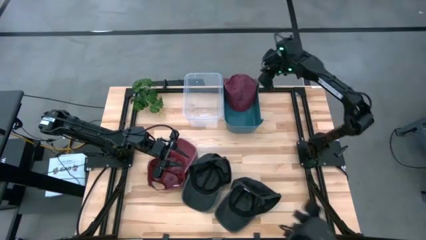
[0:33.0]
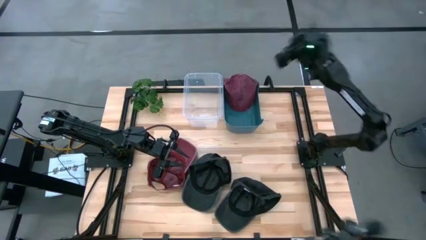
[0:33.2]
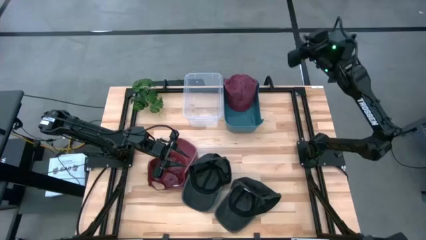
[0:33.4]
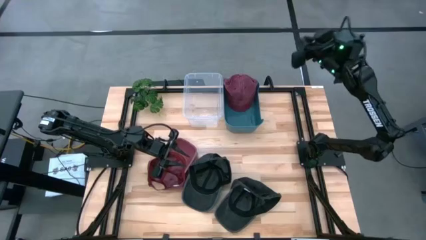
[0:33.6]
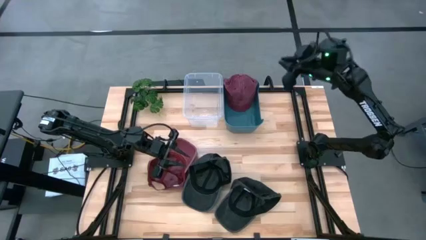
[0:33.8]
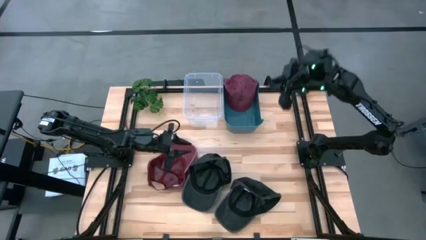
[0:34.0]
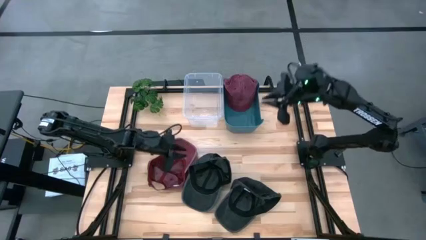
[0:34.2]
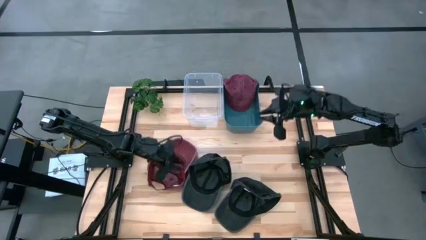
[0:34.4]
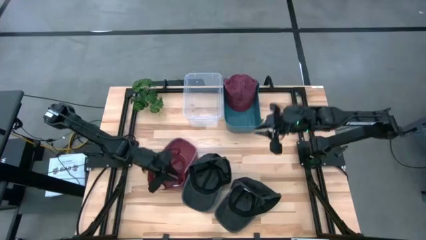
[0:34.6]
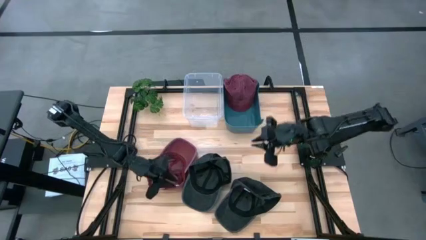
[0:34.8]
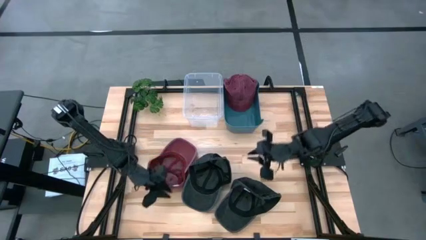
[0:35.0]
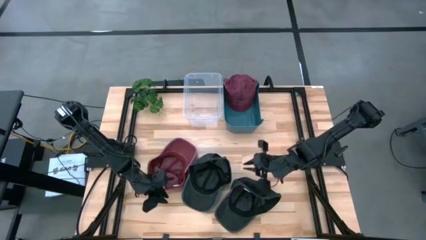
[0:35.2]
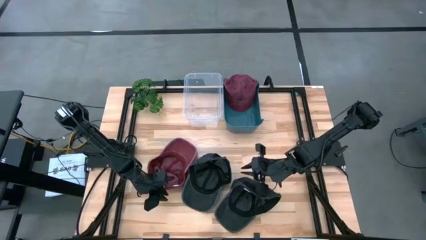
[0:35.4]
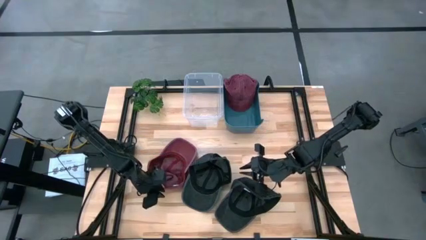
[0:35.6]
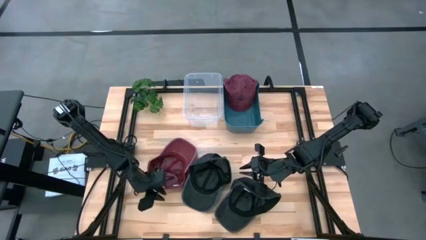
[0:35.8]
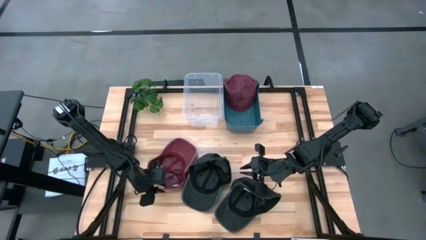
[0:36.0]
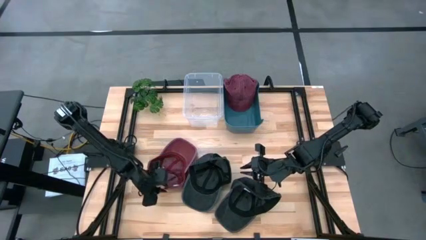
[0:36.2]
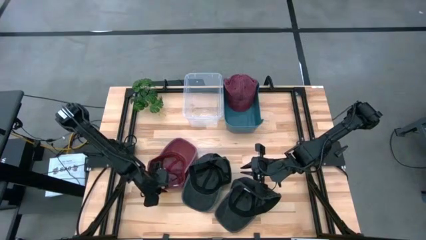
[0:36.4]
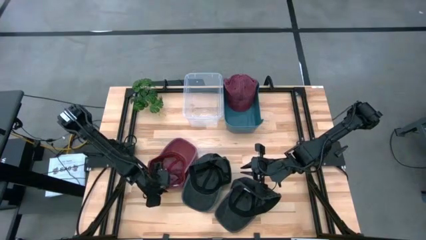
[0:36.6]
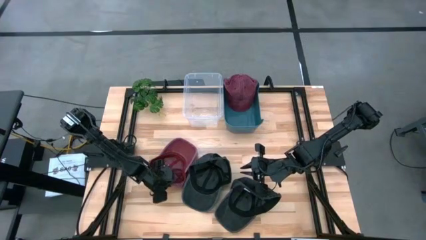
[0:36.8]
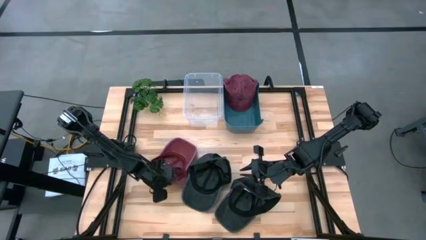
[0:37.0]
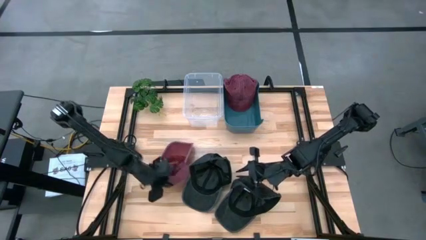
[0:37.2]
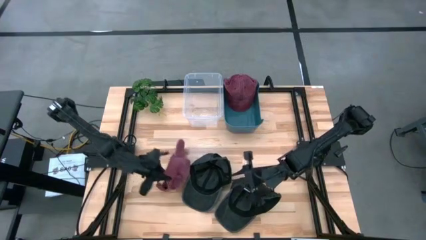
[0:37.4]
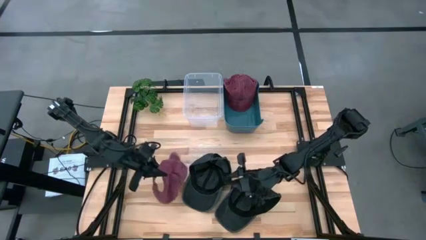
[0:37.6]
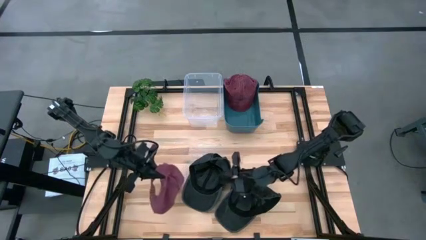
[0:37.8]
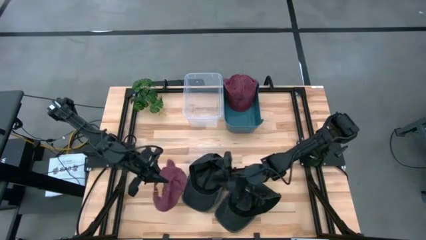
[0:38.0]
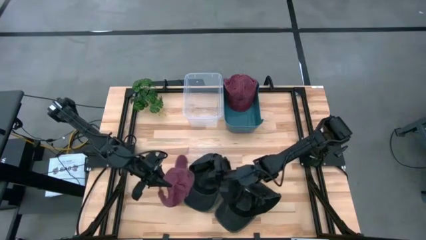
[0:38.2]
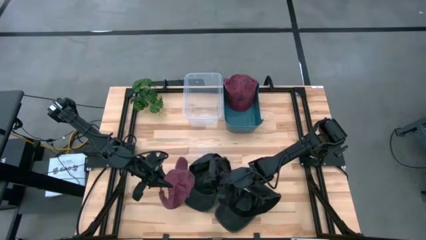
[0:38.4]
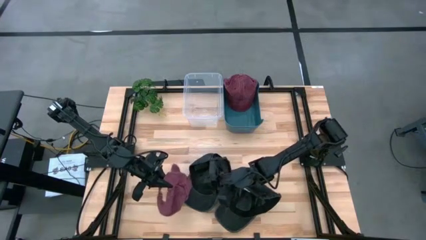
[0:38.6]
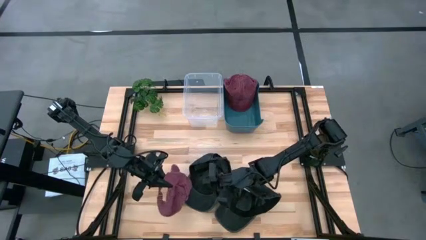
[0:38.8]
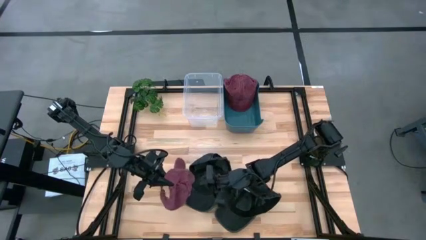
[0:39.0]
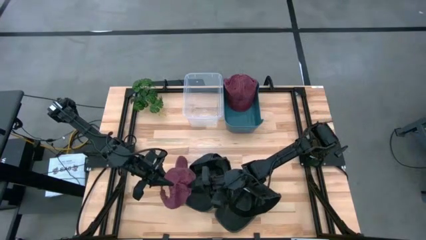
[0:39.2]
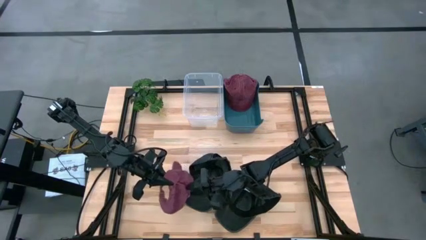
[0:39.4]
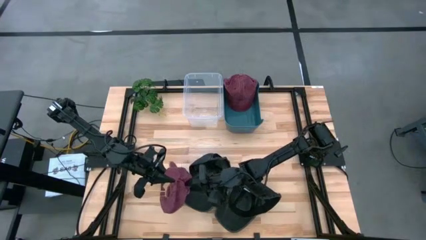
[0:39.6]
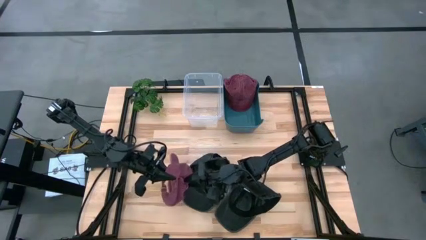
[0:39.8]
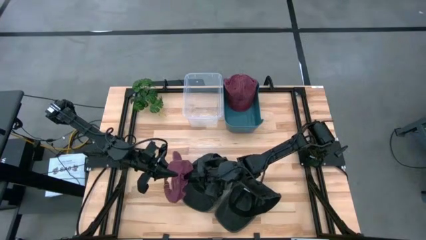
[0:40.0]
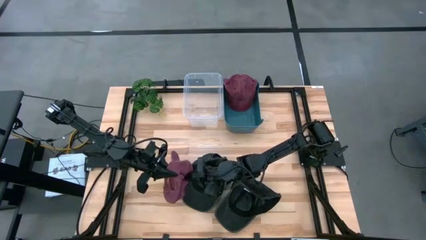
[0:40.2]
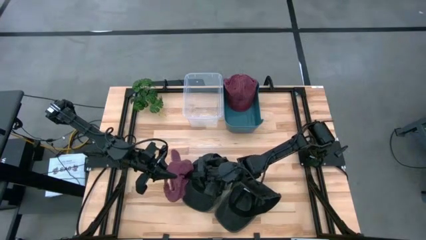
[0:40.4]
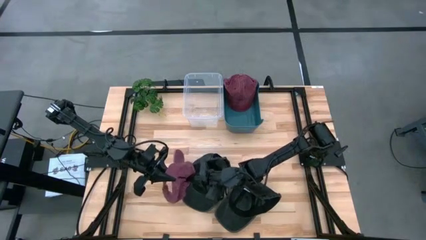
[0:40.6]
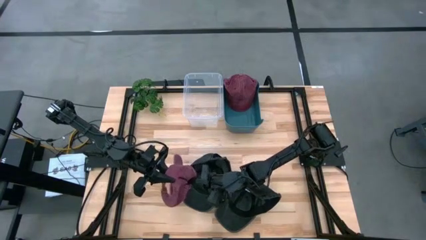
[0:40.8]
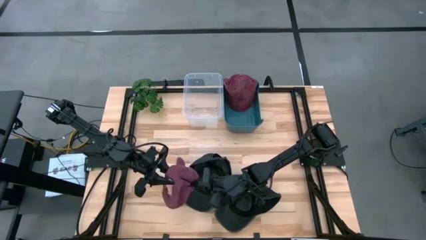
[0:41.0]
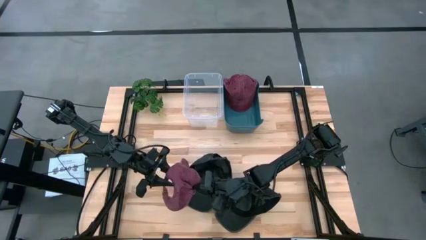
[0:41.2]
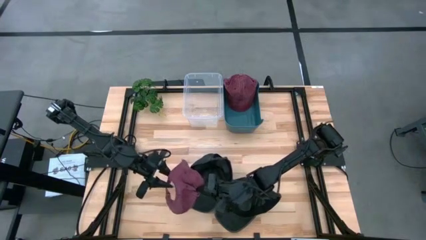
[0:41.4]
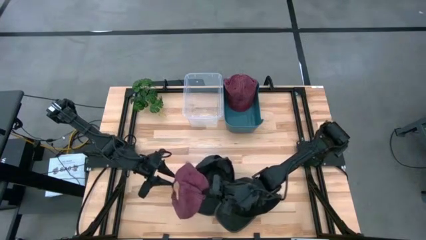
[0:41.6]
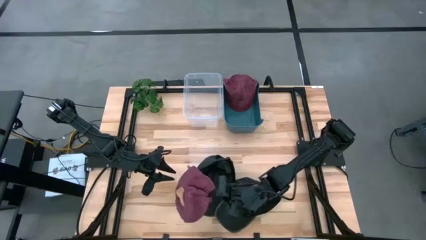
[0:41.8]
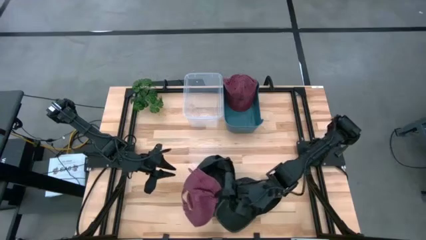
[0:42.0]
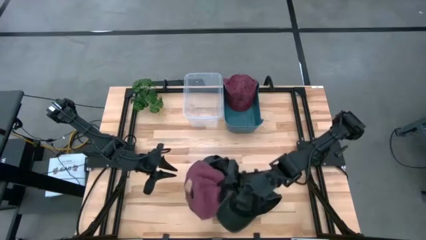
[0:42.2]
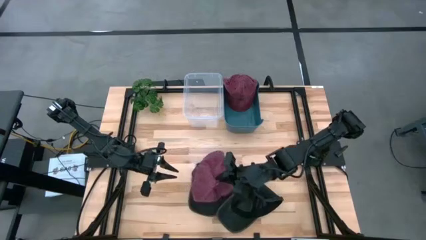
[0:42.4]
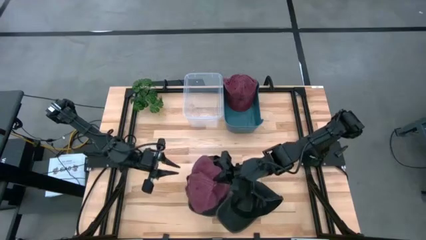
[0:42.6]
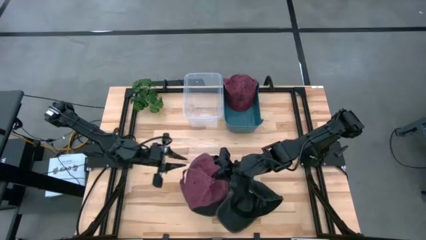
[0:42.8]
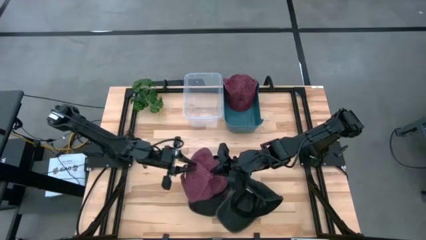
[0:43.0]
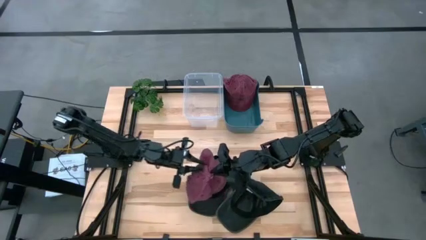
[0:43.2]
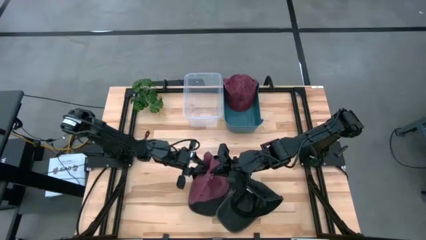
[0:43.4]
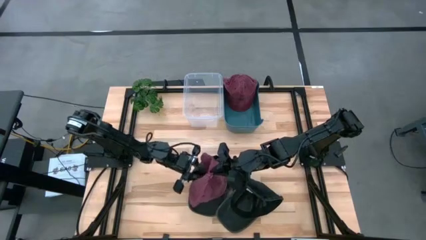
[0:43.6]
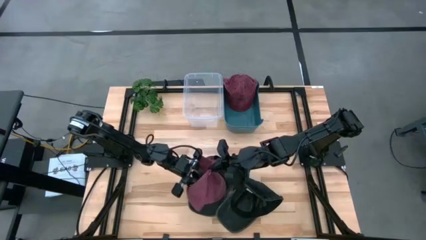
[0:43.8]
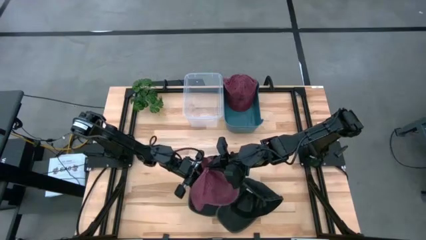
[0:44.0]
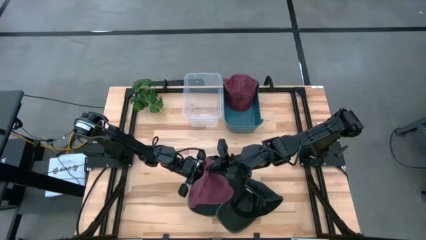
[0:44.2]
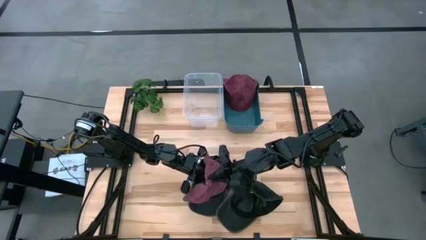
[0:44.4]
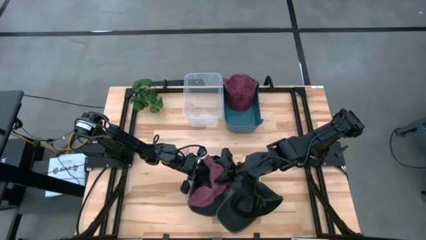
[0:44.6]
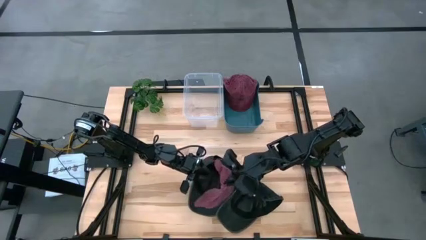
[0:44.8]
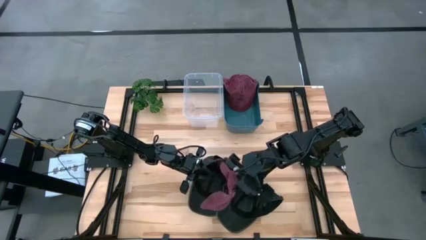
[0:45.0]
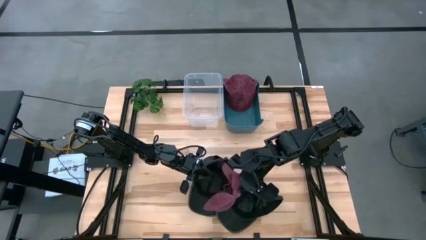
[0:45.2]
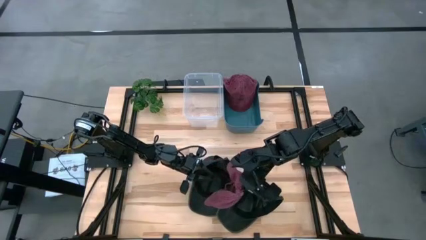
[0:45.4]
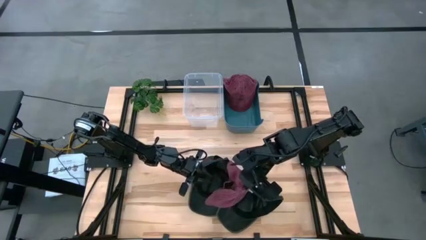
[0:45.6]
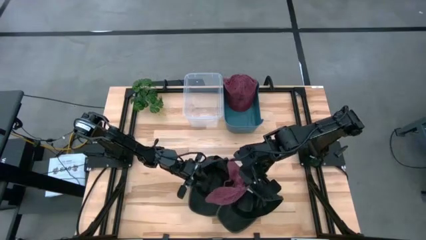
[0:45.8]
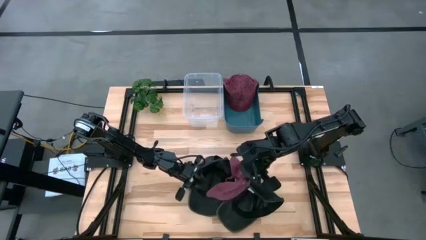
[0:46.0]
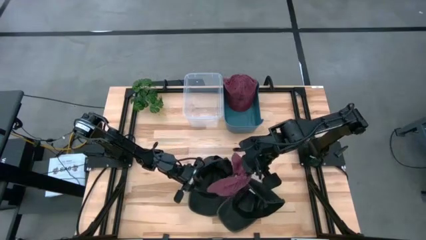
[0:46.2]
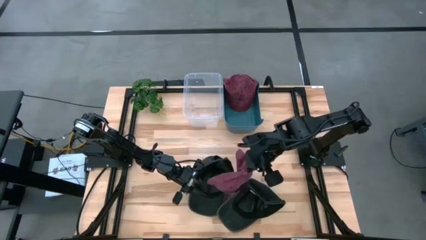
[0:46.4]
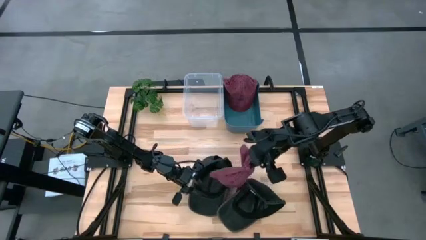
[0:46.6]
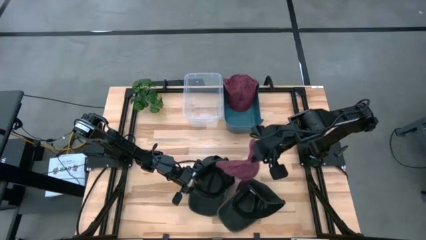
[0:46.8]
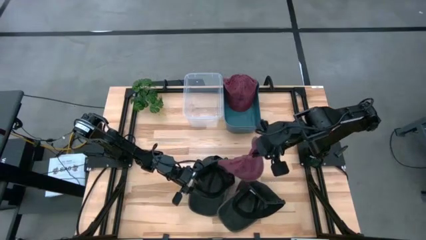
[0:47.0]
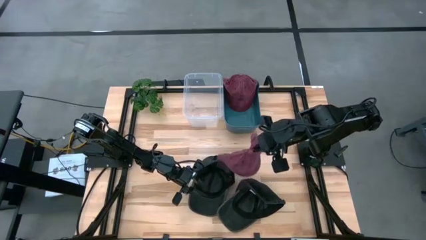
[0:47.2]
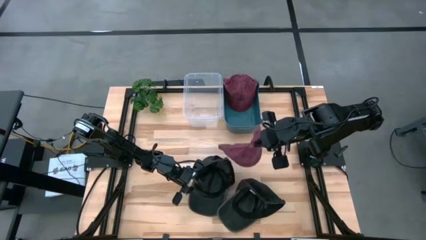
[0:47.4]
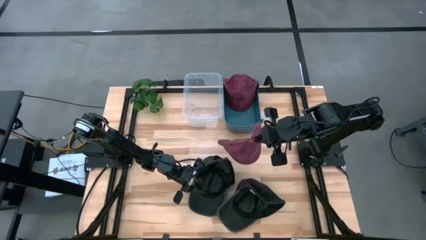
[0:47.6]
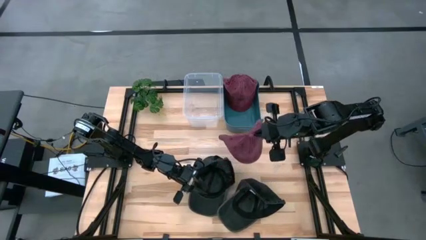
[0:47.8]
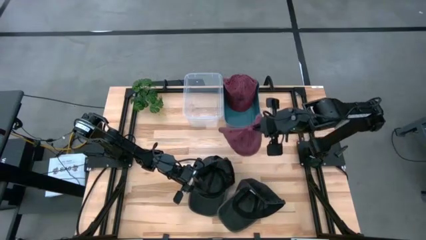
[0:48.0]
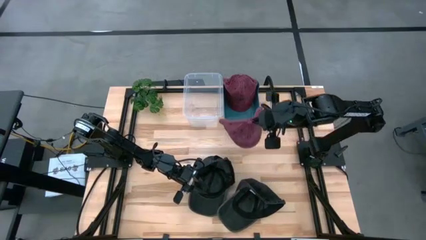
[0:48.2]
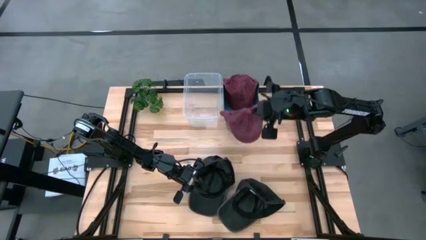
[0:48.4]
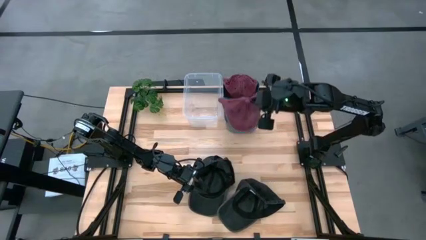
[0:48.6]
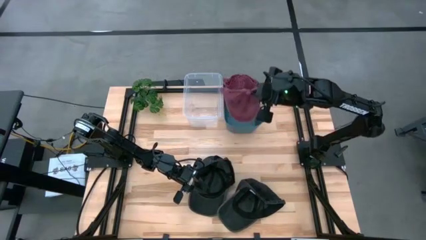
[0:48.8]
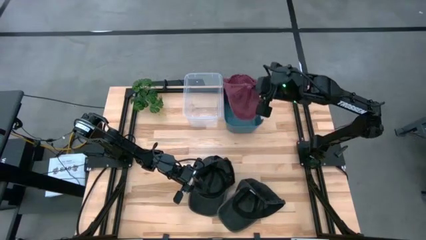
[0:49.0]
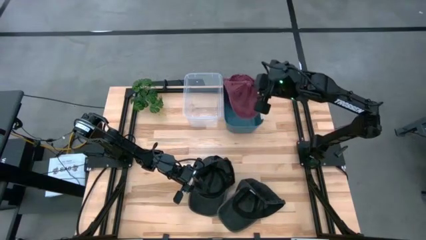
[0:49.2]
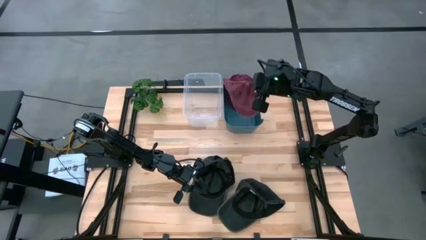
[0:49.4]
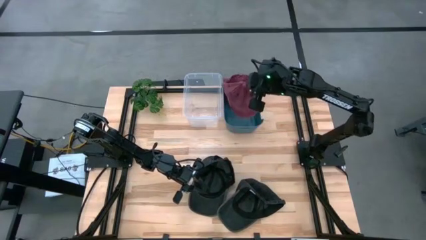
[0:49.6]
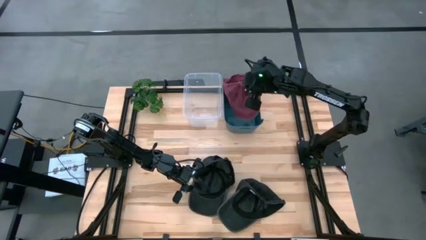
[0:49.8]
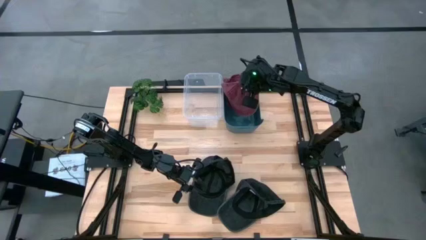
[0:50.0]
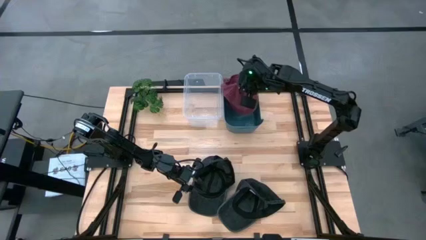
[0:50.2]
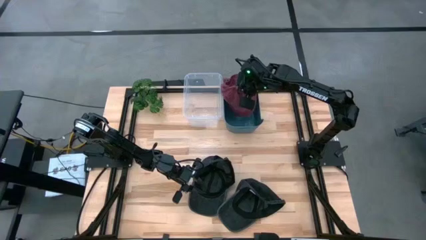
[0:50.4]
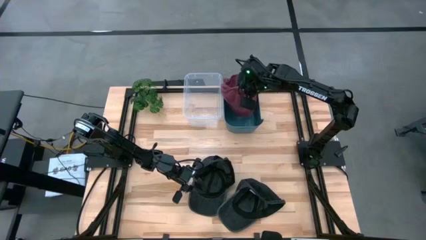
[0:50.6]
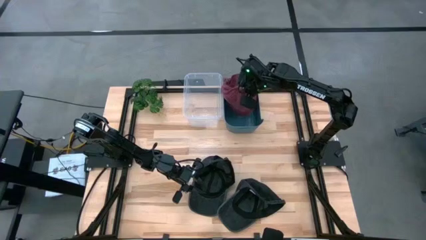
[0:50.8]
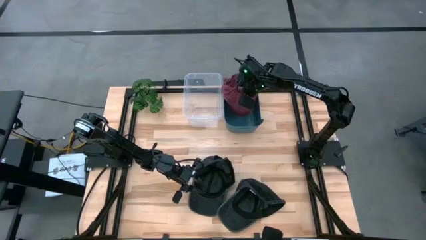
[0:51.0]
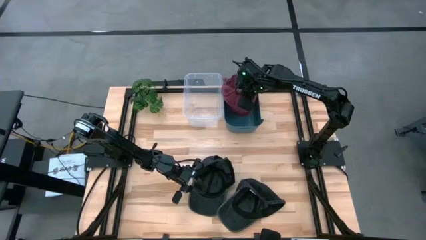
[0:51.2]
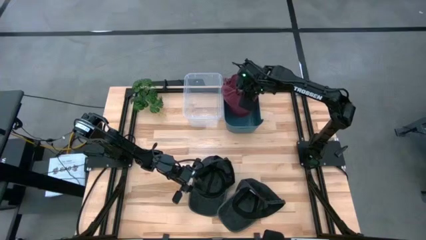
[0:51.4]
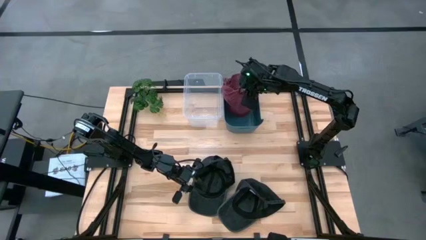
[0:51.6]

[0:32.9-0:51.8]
Task: Pick & Place hat
Put the red cap into the blue bin
